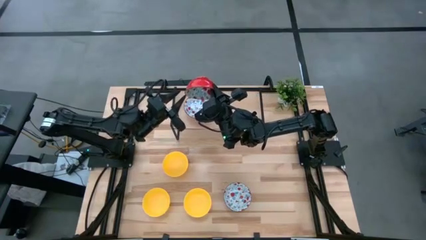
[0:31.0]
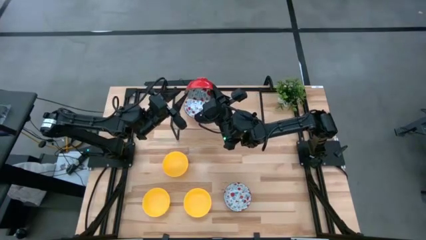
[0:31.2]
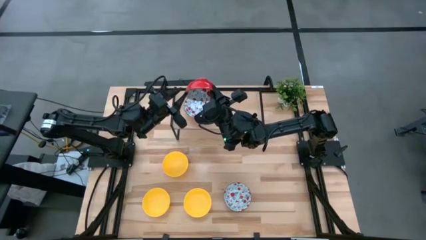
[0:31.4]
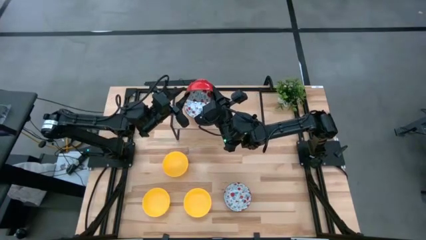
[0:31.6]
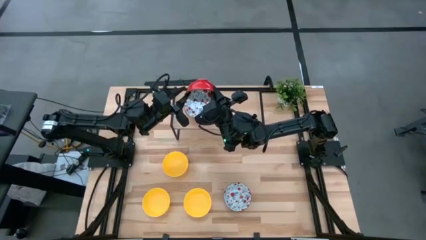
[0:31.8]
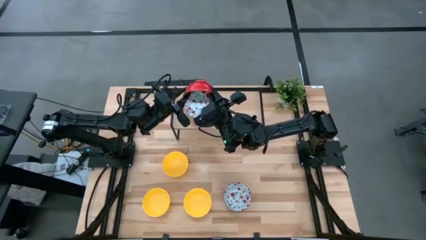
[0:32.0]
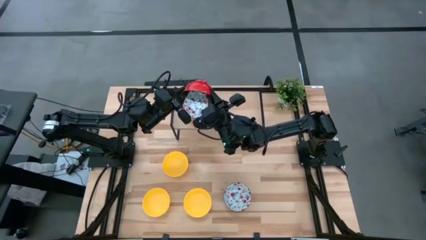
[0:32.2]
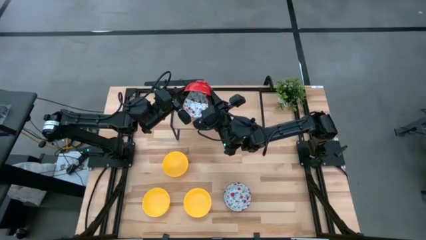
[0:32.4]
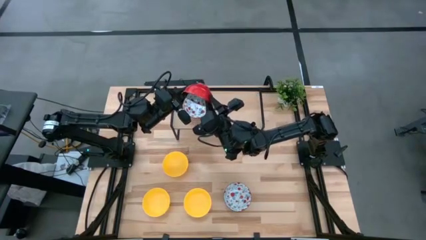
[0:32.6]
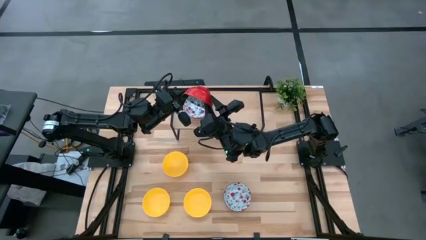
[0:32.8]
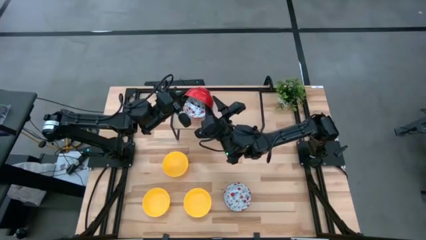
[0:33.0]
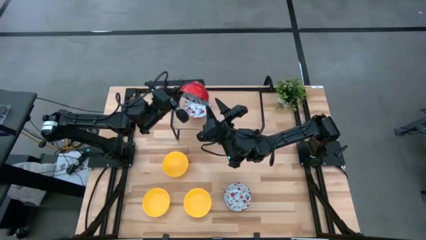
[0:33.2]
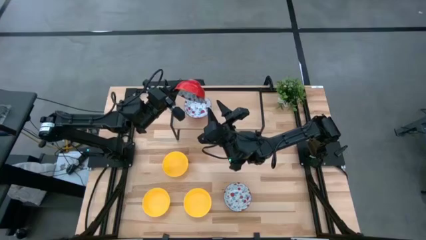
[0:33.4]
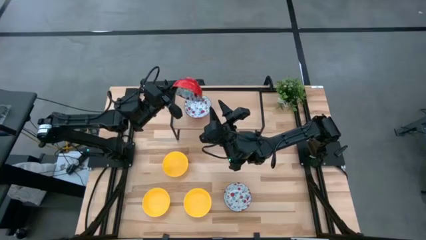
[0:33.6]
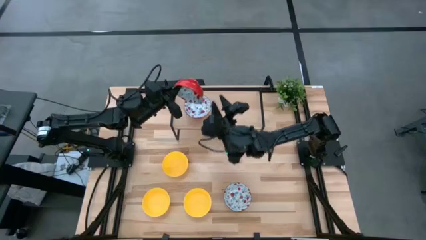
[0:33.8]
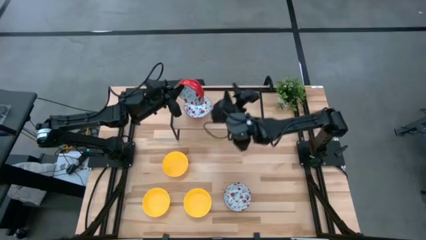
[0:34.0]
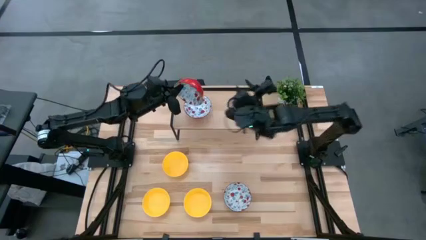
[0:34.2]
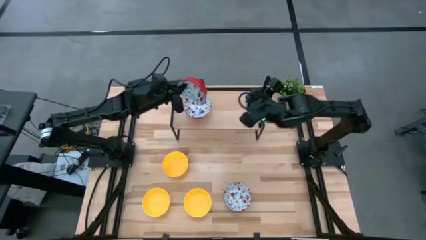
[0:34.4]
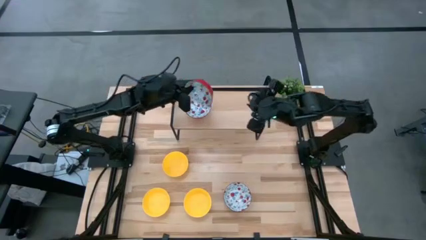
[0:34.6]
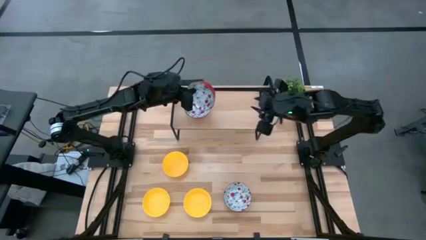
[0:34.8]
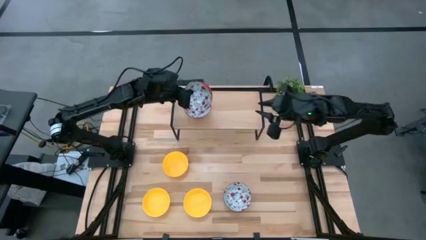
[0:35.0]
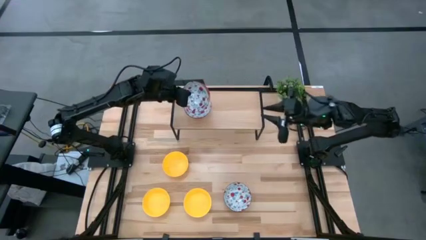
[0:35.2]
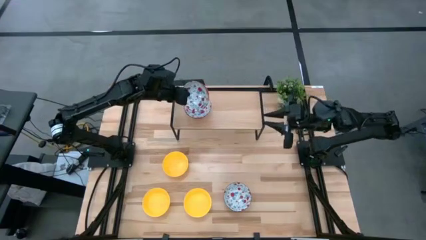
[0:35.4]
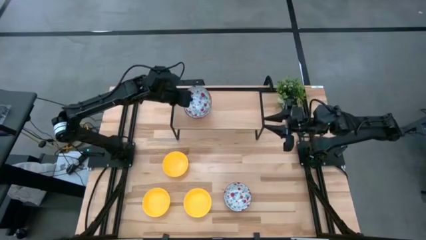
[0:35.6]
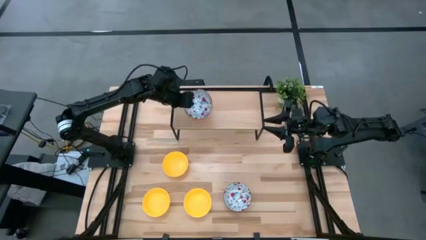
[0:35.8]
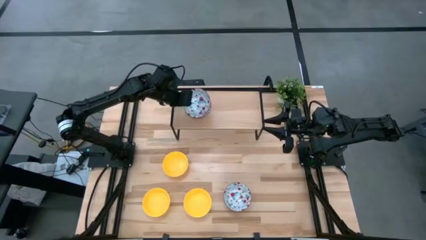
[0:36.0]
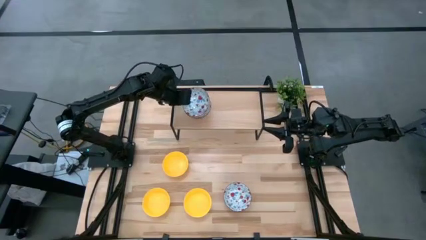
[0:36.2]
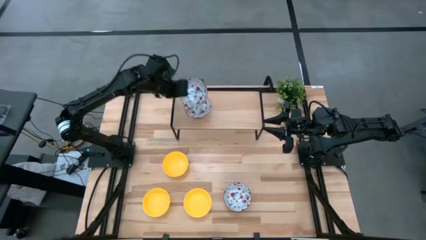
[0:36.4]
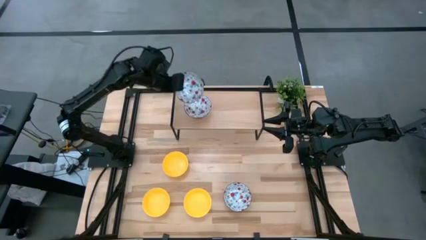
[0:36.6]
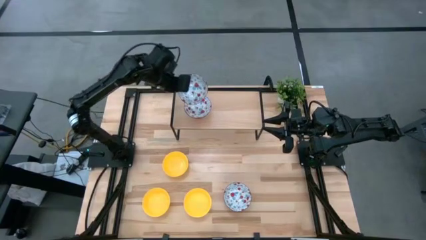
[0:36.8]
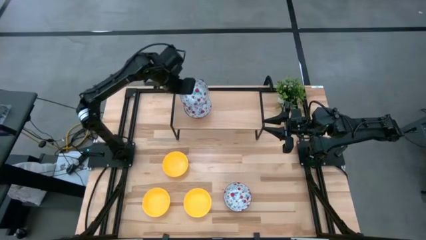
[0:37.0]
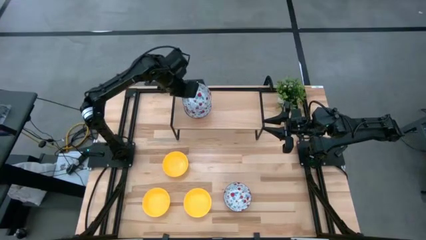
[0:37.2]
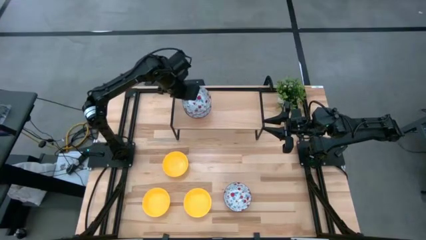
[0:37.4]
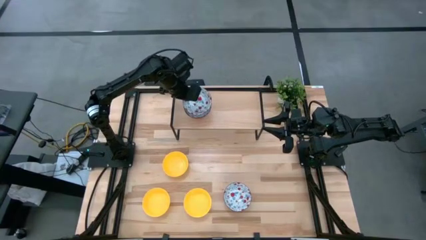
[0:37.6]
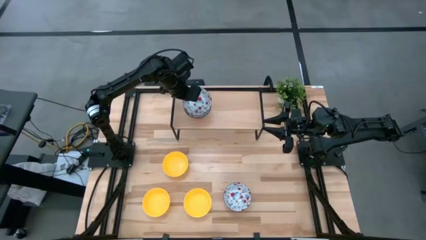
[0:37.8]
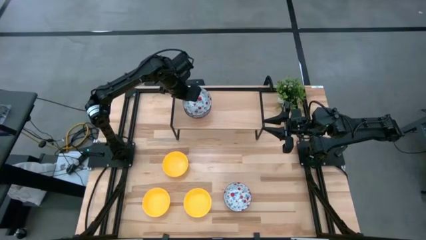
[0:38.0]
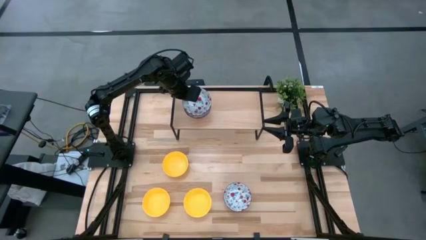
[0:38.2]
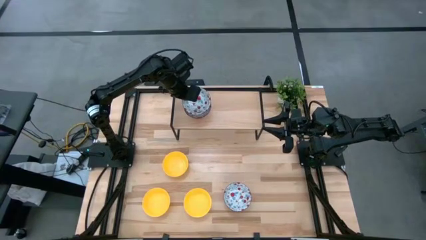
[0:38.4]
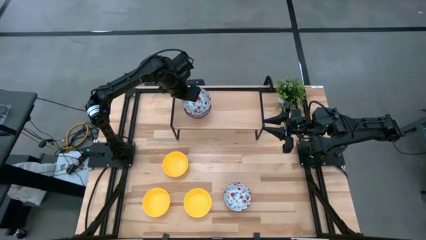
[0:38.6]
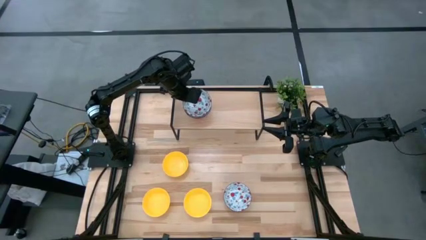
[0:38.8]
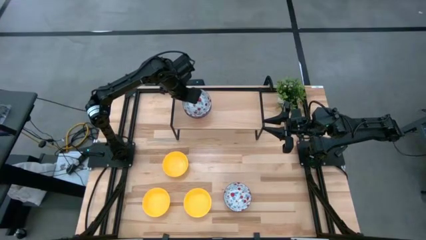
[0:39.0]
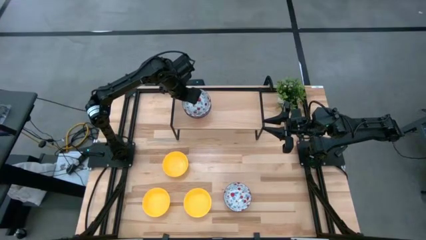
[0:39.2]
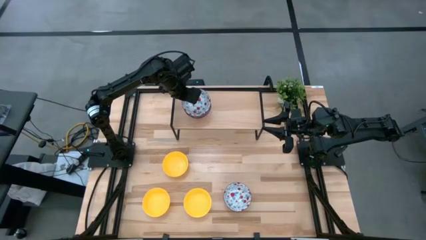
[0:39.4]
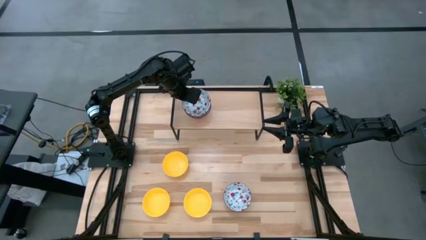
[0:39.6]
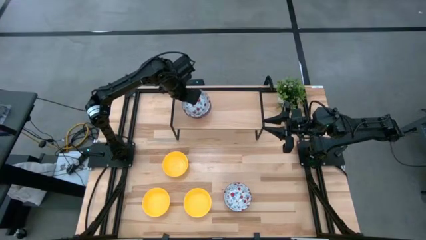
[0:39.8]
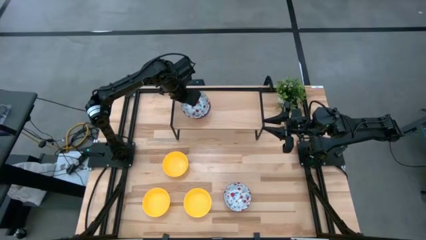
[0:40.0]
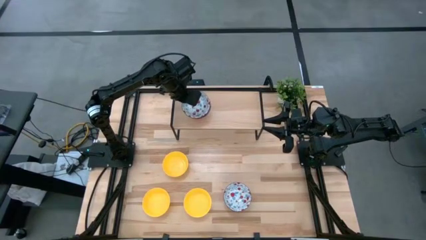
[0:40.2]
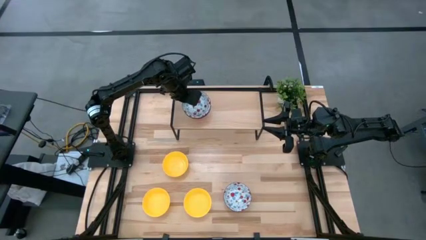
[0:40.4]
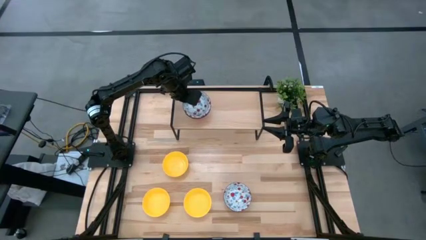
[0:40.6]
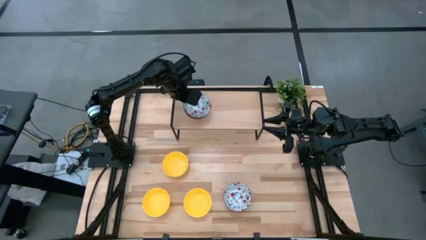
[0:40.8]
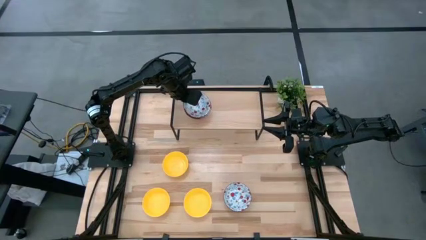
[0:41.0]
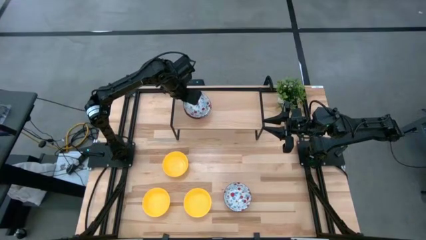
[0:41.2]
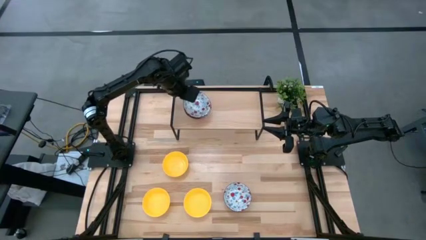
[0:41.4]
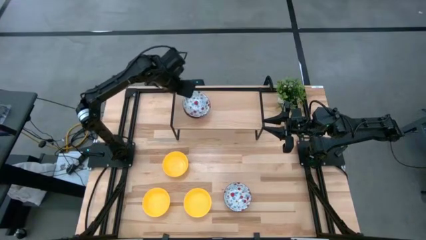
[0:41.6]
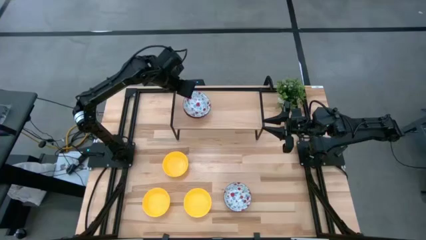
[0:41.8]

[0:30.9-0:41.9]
Task: Pick & Place Mini bowls
Stack the right white patterned bowl on the white patterned bowl on the shelf
